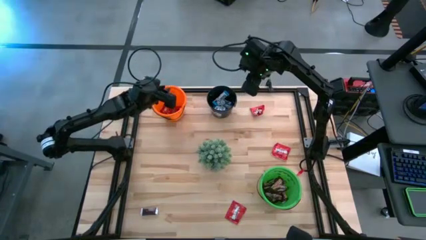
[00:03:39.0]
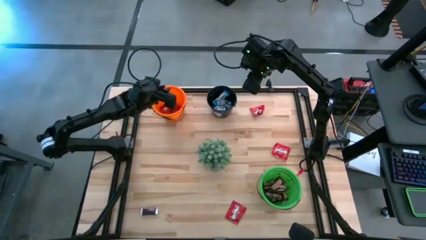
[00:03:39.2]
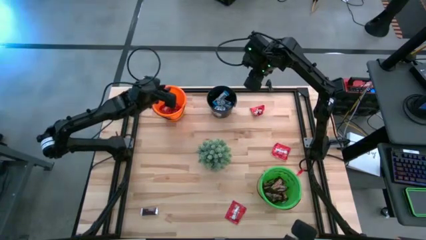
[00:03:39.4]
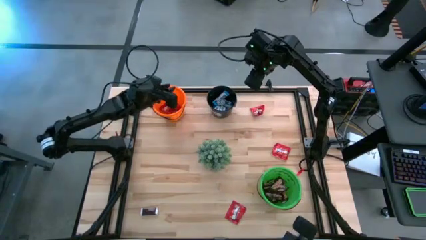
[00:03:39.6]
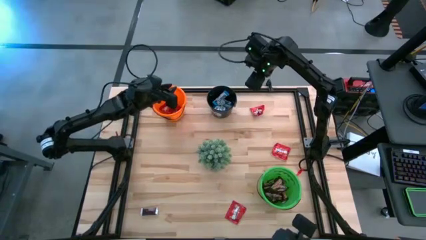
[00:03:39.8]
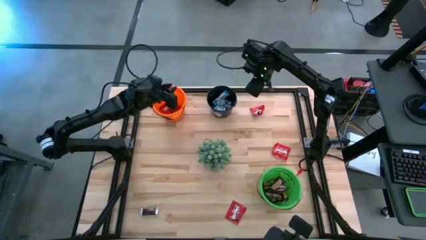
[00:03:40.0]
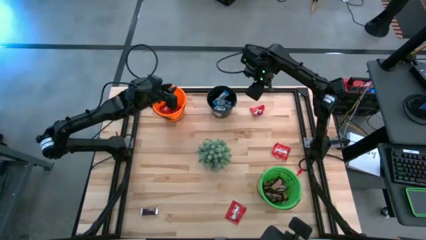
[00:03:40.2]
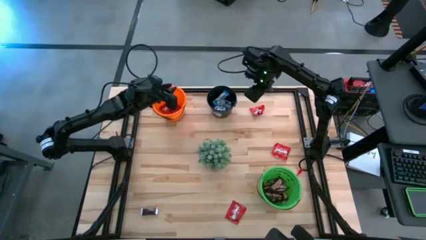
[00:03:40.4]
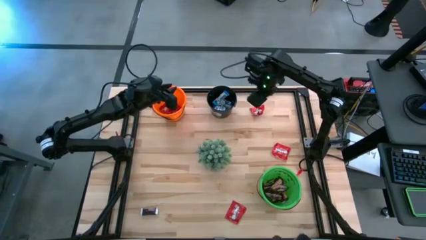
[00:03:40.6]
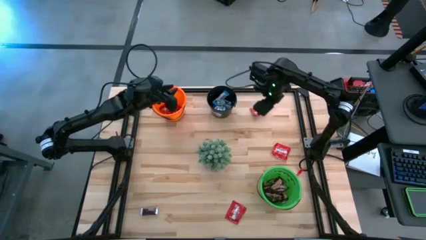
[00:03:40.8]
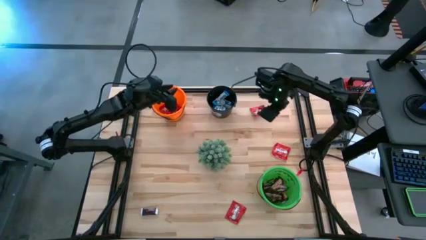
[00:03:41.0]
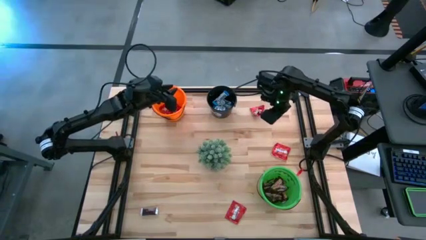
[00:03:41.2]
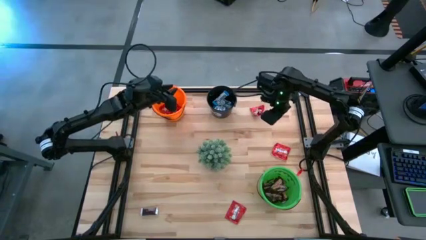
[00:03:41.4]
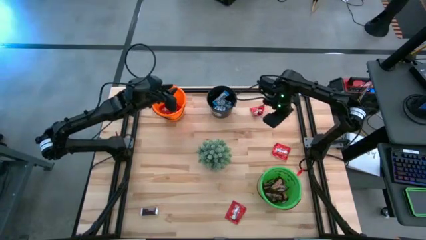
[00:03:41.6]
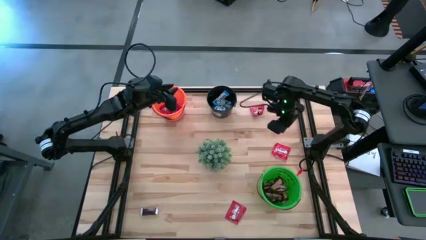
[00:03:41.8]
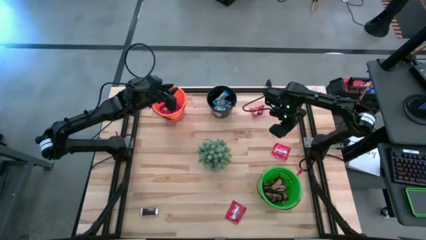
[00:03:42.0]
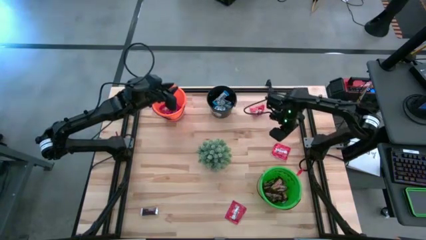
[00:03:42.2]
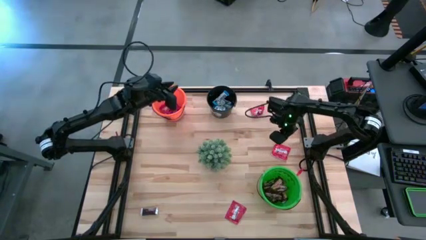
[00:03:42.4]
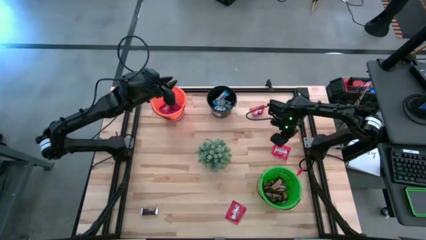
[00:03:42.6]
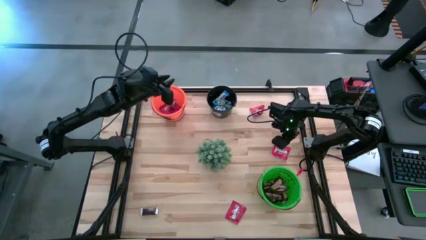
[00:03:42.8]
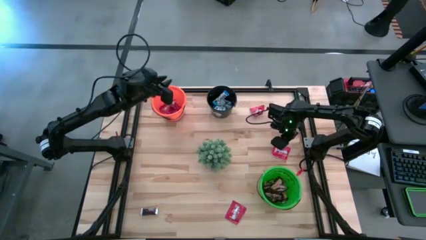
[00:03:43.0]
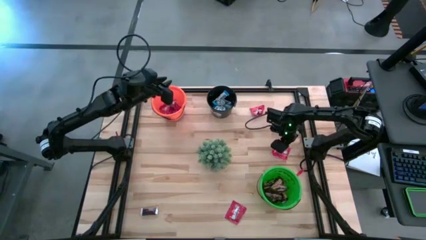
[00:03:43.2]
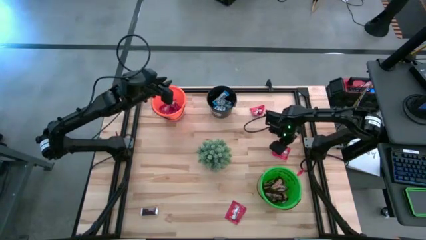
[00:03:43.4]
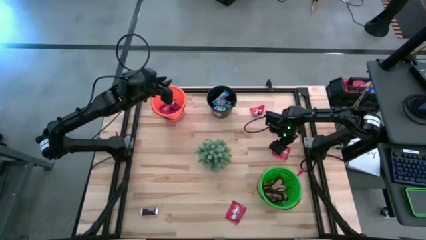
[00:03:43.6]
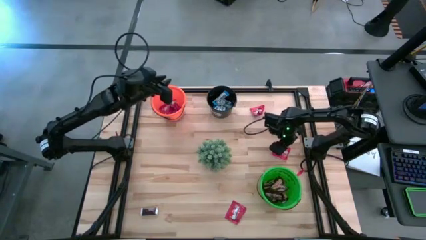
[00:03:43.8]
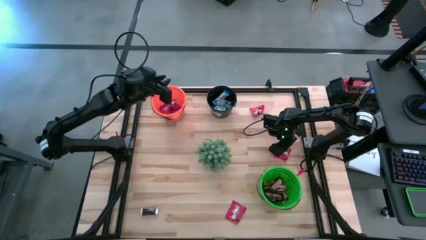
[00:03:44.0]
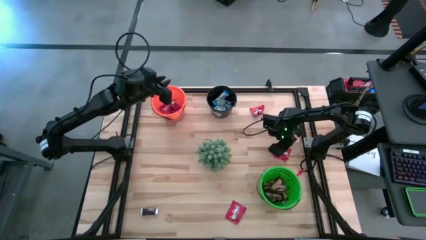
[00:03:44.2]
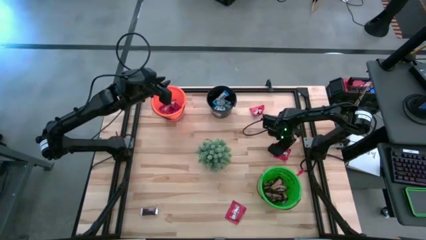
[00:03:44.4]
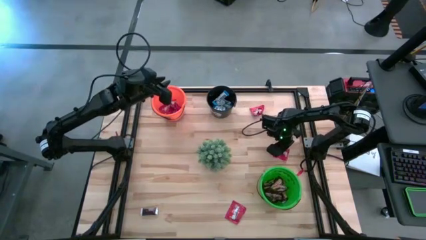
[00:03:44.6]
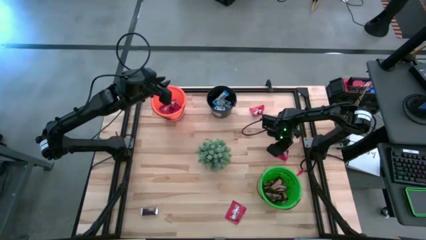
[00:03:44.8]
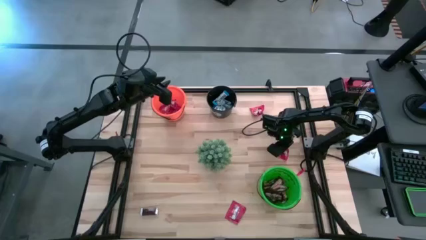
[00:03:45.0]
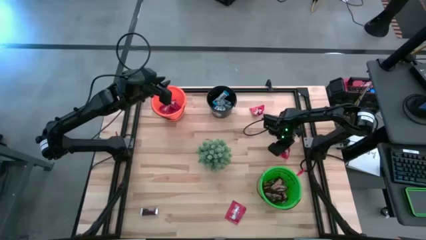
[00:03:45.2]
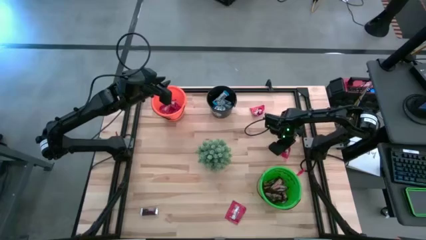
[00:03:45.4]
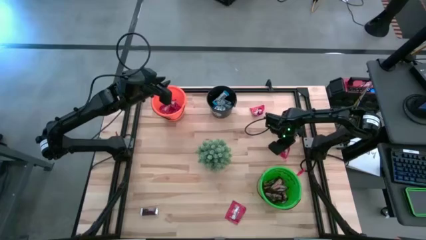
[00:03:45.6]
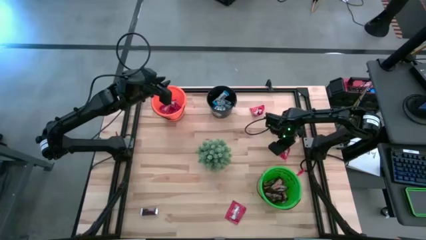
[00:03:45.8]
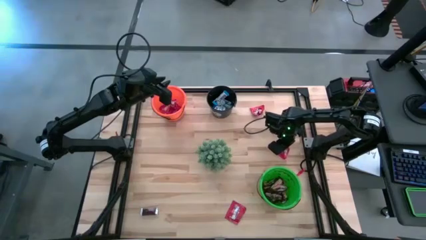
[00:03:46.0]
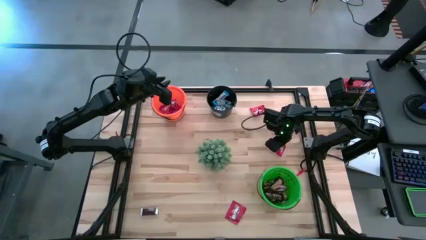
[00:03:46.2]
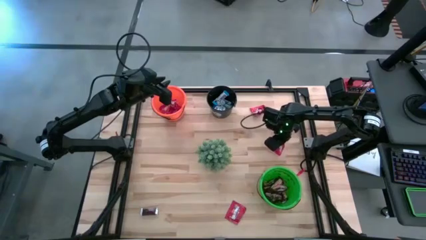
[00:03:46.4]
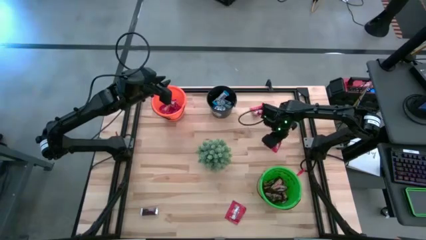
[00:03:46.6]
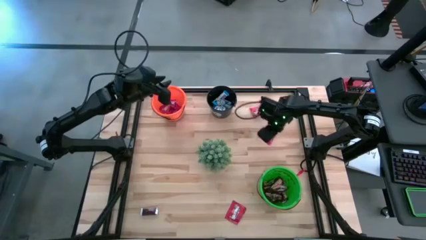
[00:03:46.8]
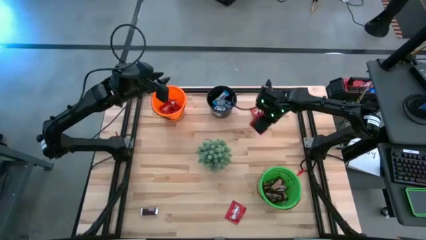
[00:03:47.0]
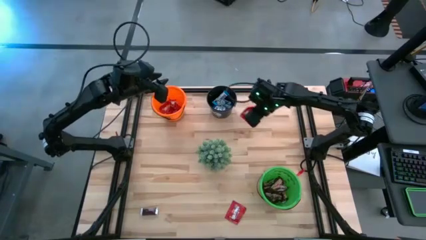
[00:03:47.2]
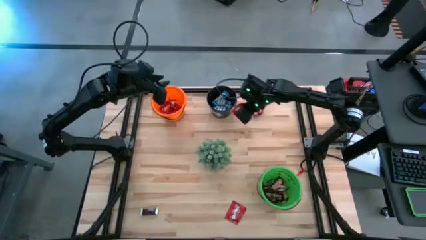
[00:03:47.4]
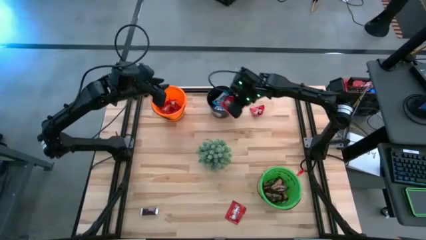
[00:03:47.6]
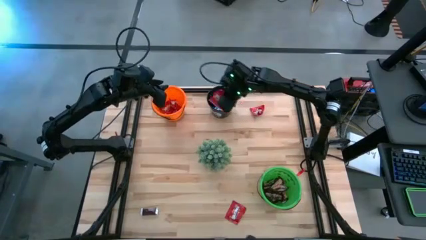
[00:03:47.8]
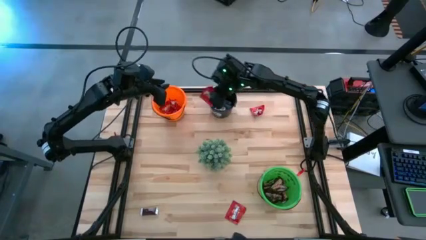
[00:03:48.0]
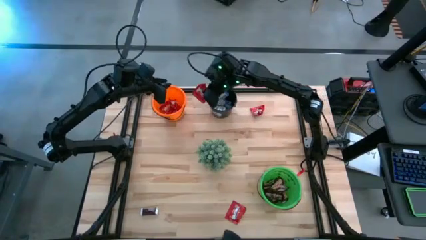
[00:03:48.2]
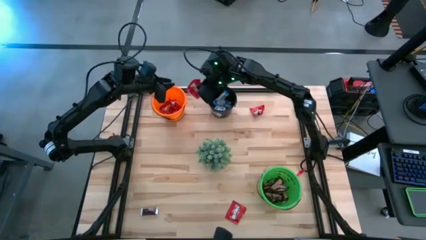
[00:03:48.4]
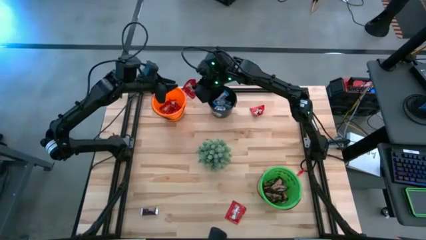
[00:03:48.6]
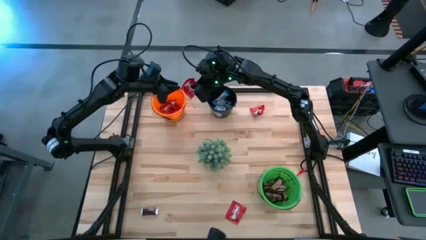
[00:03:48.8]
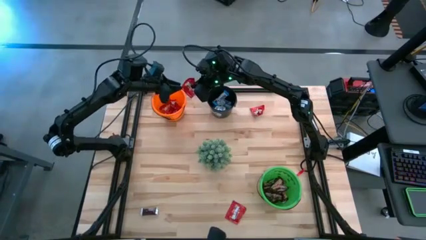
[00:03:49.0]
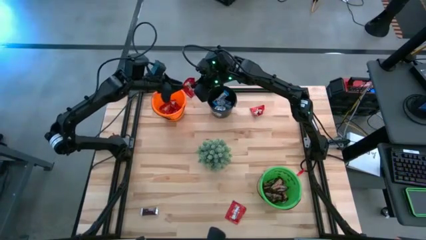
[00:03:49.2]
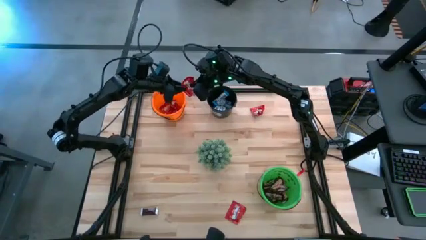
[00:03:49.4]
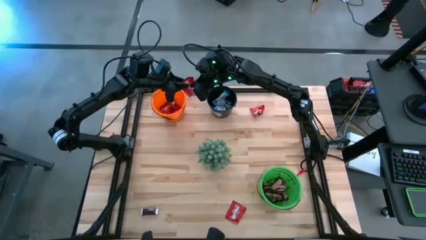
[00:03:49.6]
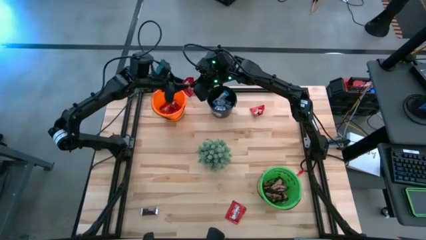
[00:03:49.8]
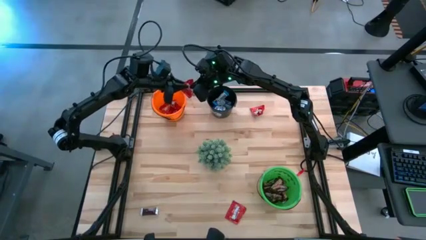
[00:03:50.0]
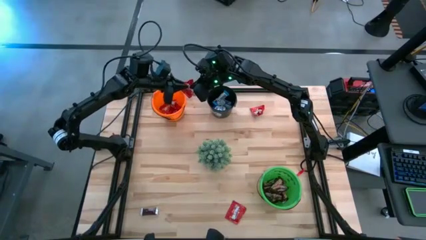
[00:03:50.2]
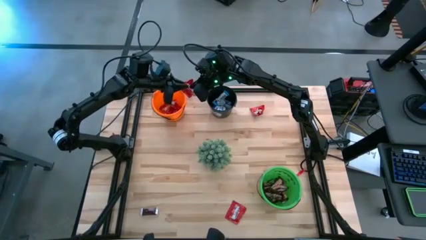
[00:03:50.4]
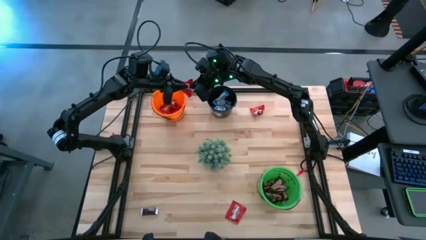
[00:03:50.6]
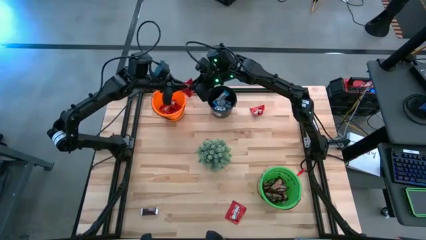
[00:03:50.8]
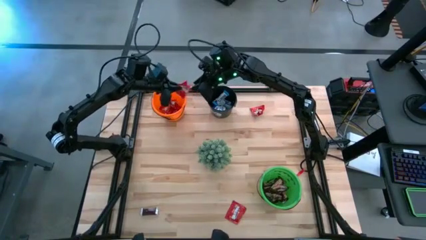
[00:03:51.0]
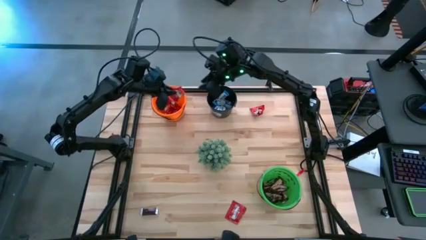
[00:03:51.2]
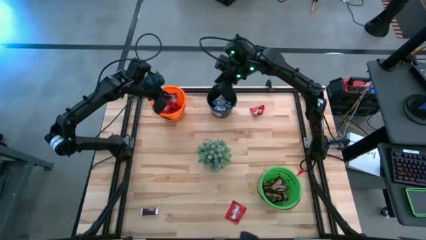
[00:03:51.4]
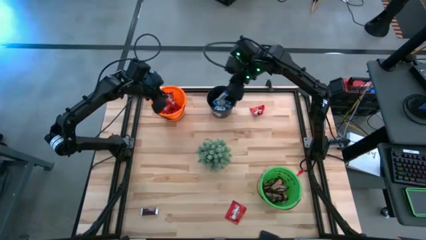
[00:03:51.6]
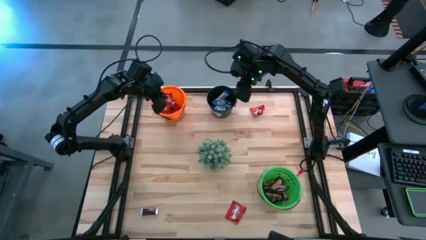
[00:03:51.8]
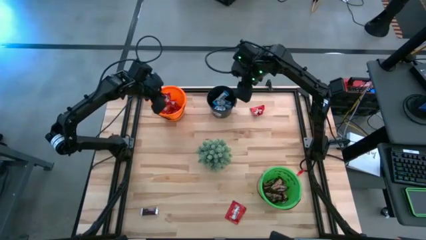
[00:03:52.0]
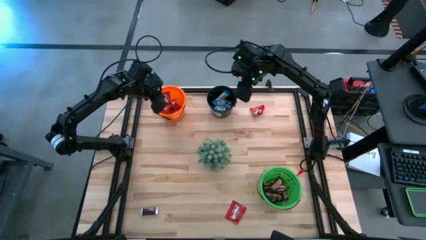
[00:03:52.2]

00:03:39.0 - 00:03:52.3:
Task: Organize candy in baskets
Put the red candy into the orange bucket
